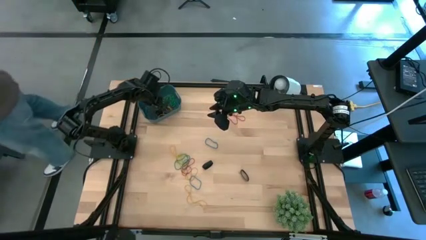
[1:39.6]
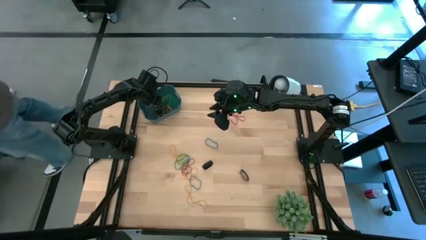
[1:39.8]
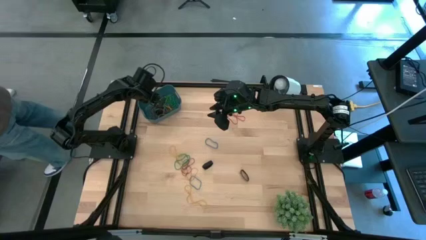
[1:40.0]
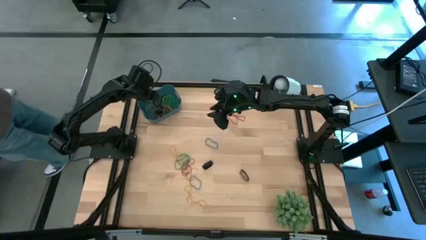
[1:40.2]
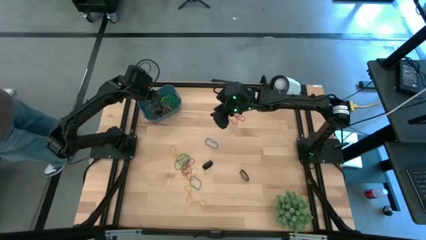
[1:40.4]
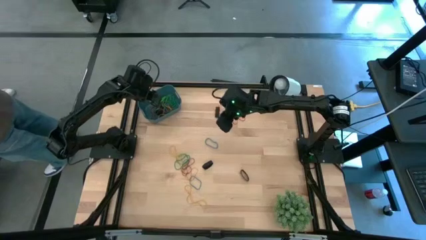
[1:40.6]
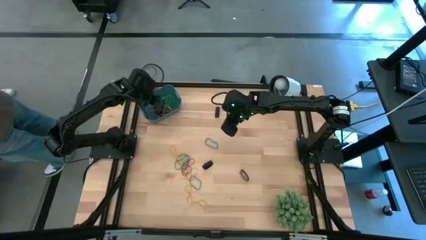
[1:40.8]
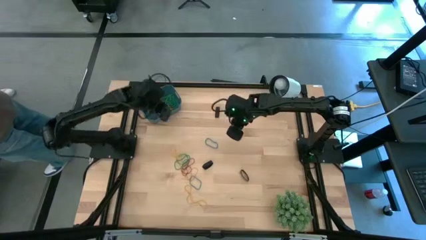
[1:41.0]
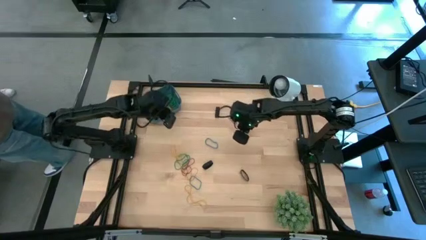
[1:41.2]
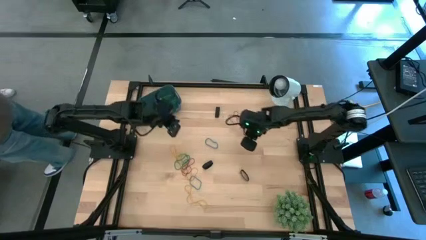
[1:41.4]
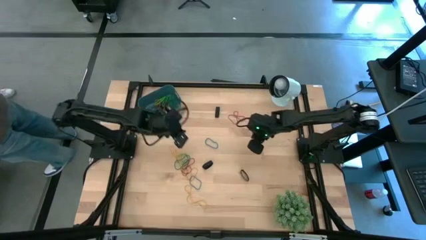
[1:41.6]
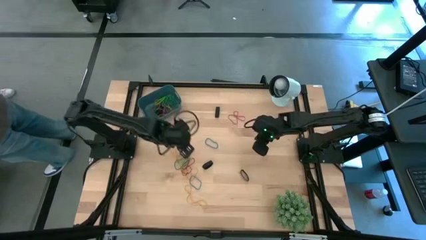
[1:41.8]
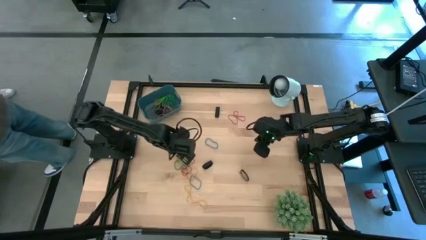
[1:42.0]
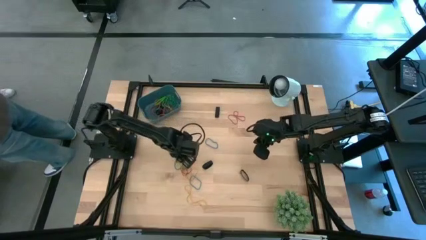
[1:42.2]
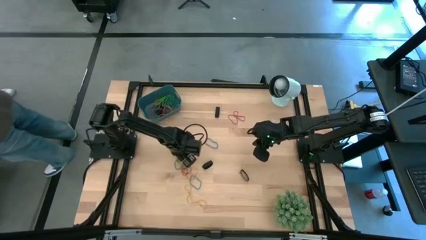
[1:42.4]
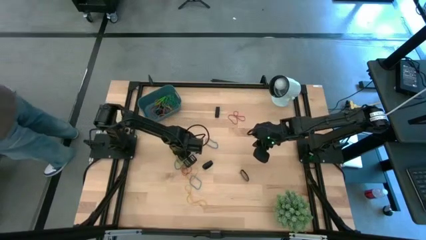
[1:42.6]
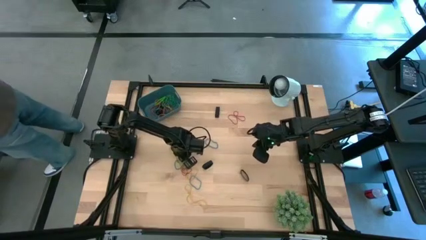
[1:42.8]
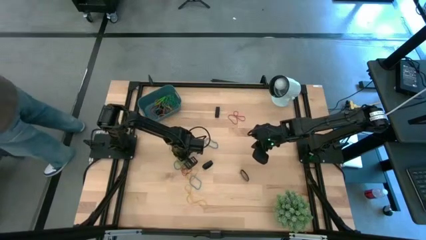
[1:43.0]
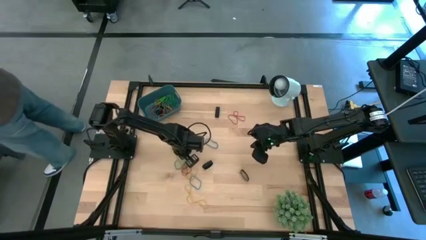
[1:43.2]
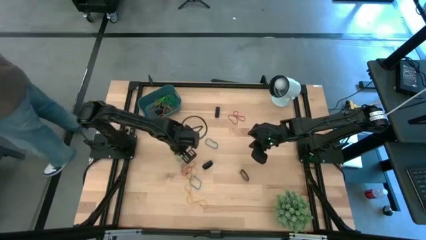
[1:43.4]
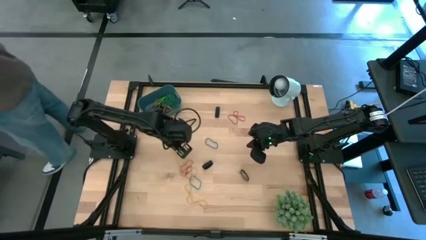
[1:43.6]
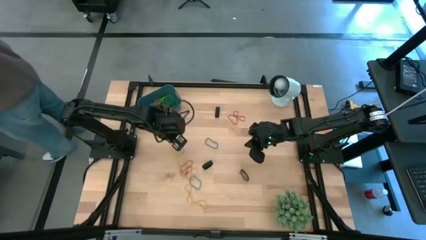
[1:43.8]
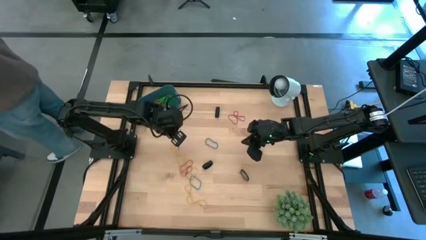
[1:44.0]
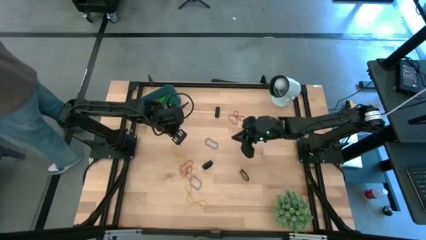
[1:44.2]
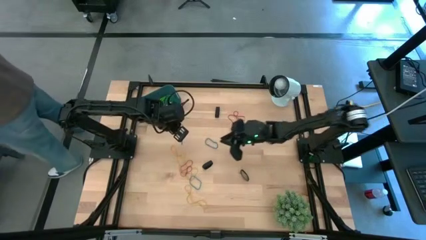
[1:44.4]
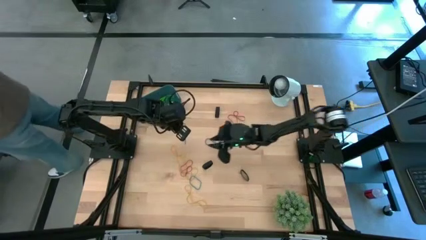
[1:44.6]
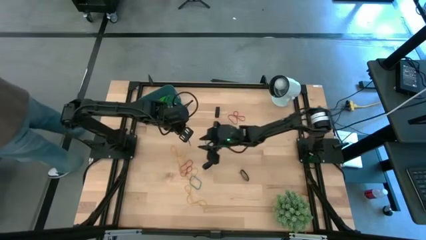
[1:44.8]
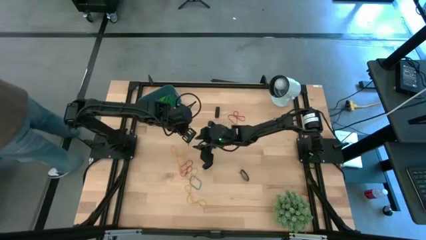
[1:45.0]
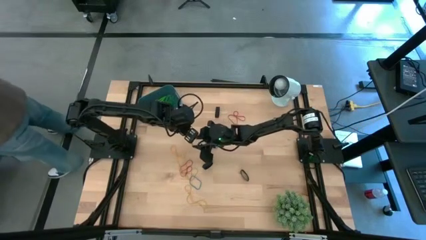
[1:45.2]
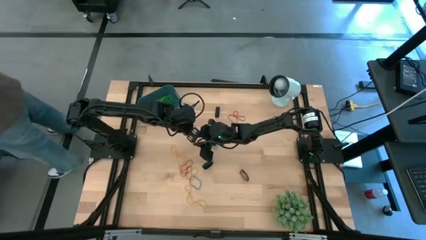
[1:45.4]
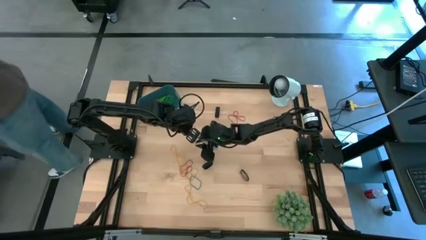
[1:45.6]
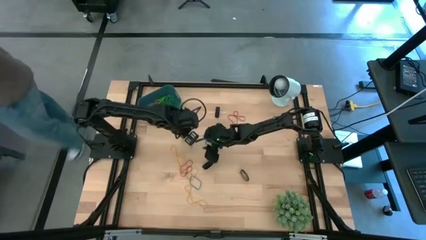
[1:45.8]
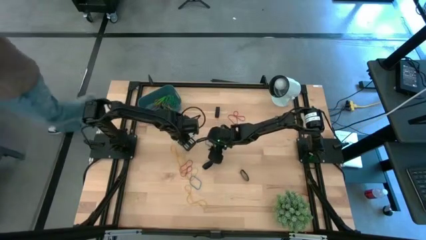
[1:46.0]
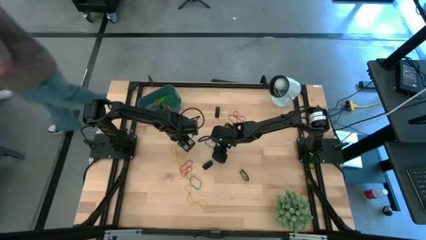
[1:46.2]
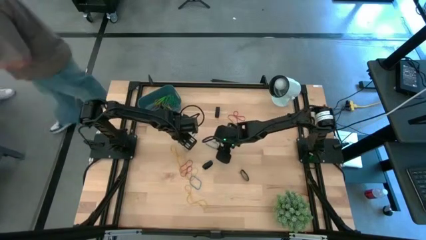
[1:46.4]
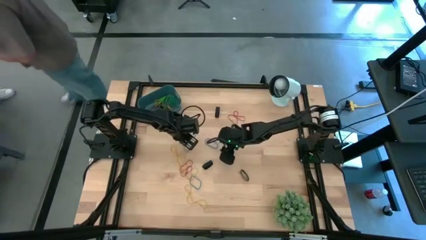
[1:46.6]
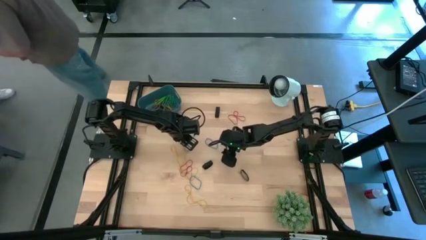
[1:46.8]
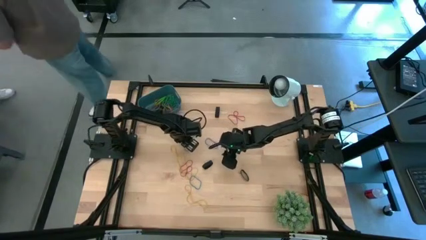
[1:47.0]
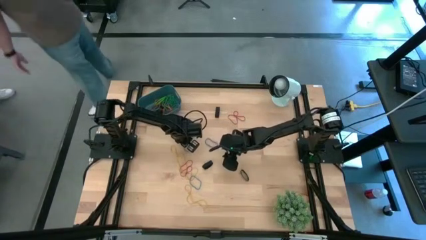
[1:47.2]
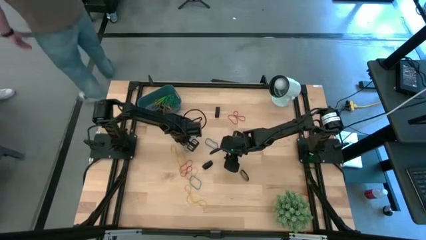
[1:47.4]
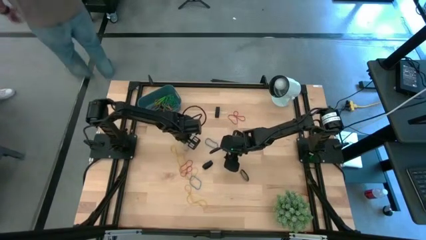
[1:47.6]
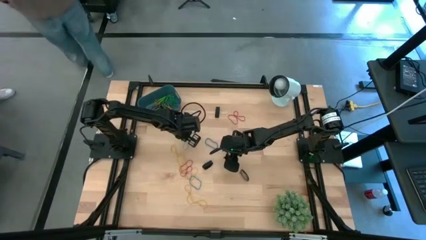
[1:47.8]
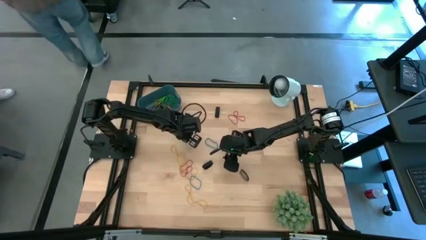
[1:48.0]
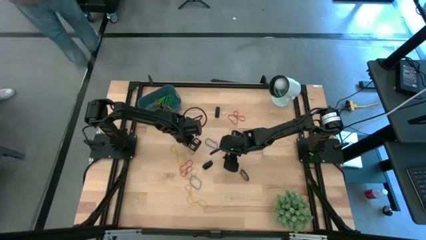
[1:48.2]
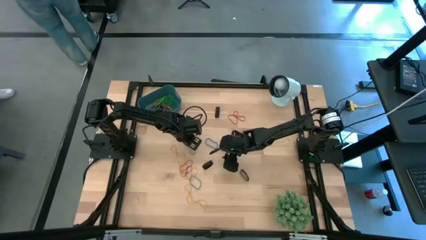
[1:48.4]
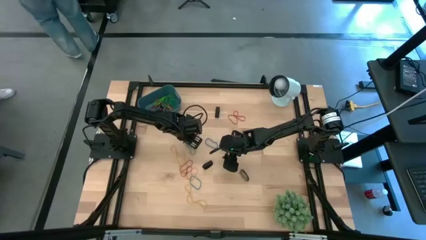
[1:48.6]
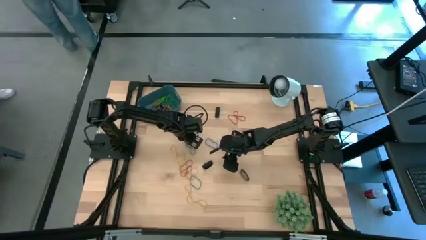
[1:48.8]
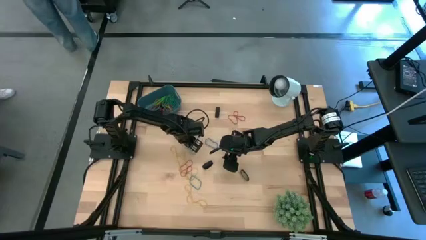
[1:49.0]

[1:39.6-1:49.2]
Task: Pick and place rubber bands into bin
Put the green rubber band into the bin

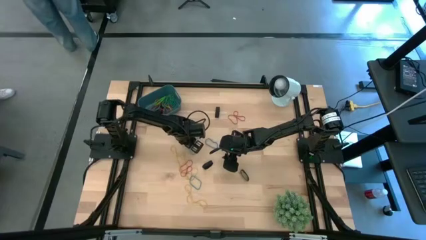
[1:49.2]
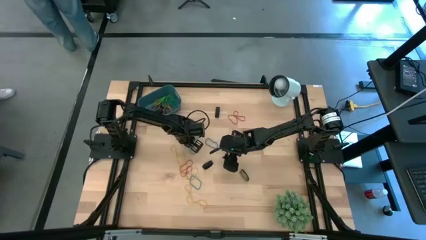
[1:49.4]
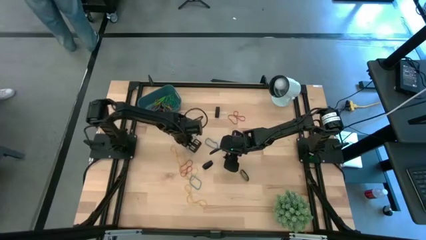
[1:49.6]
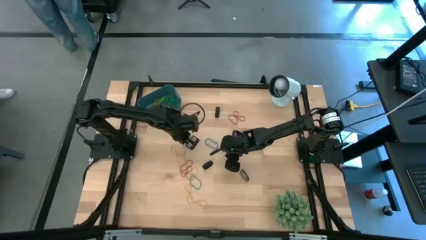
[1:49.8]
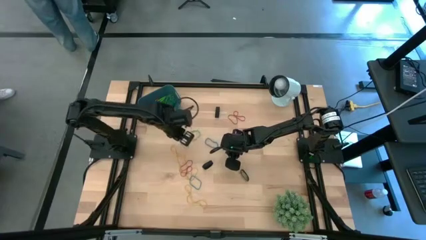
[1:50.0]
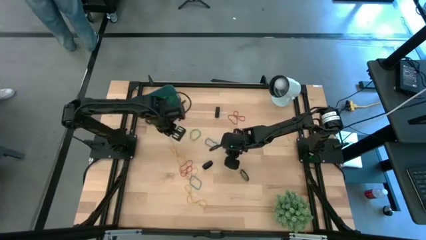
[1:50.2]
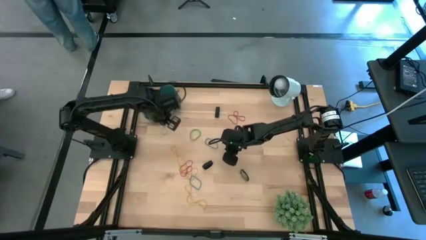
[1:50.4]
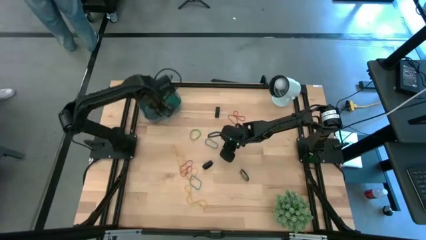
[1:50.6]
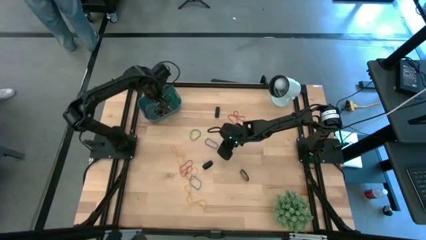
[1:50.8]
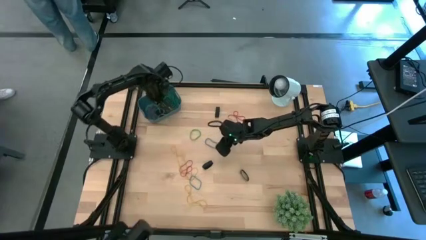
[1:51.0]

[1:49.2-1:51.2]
Put the blue rubber band into the bin

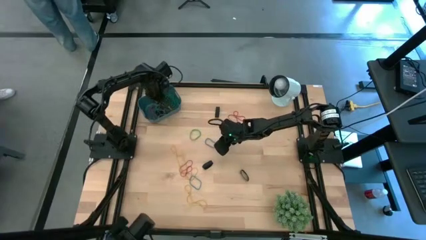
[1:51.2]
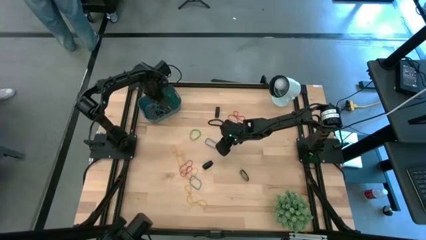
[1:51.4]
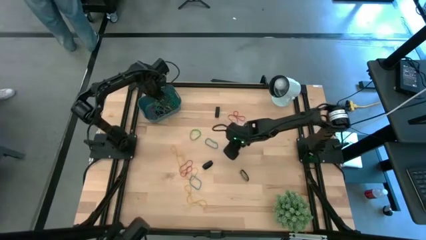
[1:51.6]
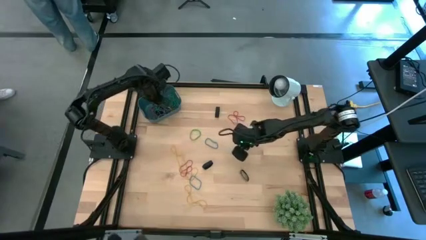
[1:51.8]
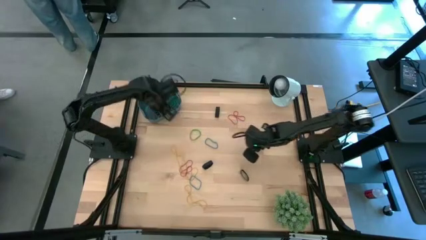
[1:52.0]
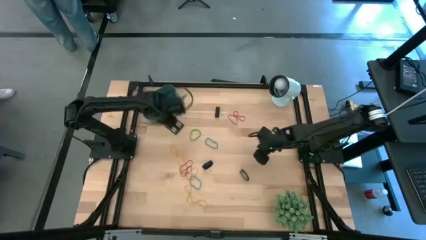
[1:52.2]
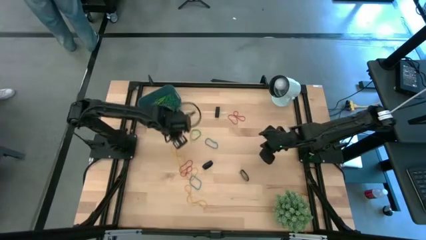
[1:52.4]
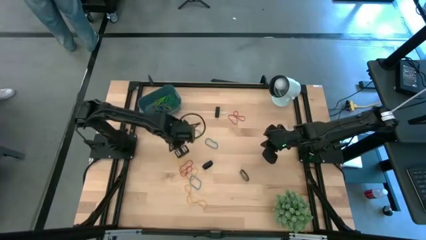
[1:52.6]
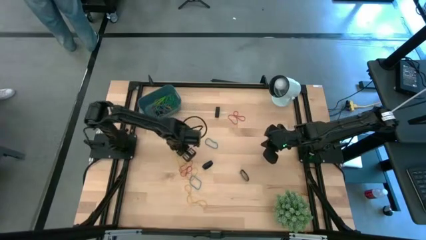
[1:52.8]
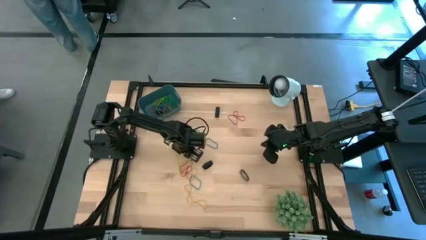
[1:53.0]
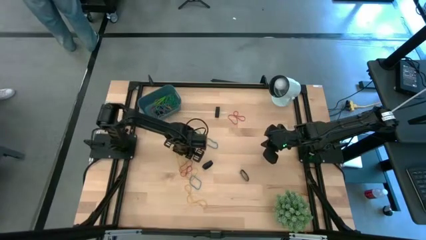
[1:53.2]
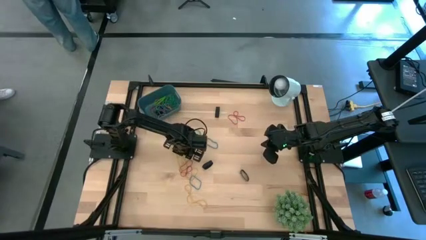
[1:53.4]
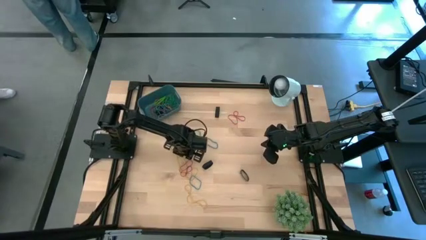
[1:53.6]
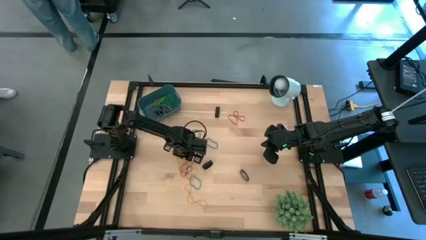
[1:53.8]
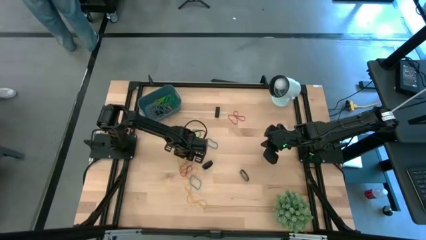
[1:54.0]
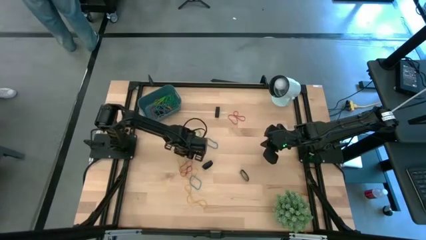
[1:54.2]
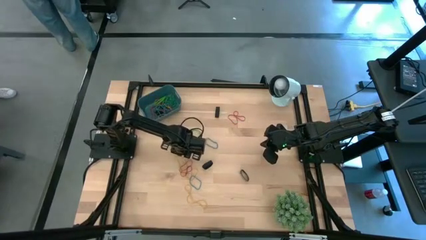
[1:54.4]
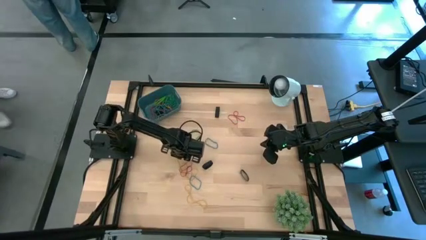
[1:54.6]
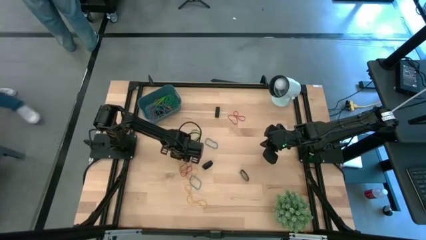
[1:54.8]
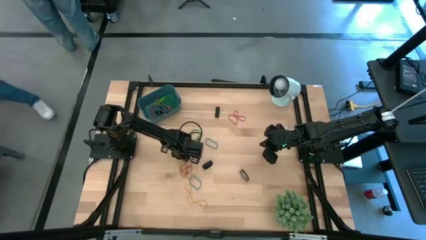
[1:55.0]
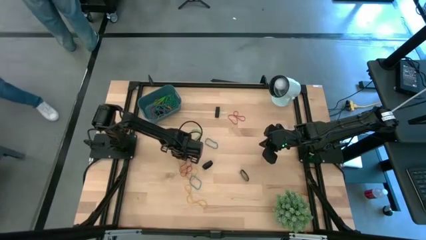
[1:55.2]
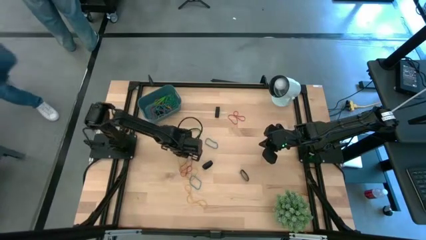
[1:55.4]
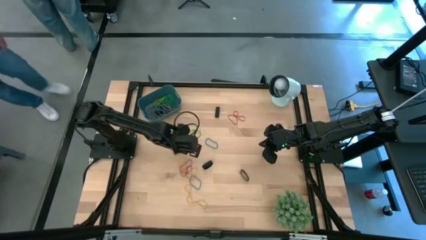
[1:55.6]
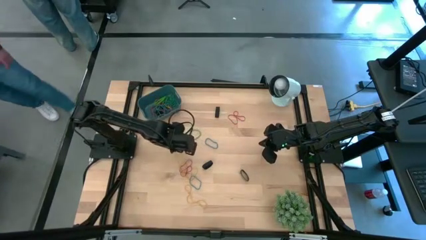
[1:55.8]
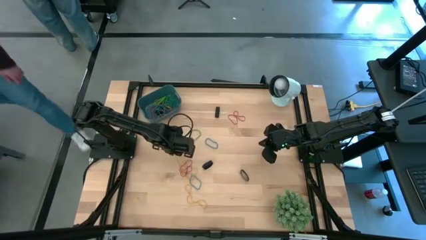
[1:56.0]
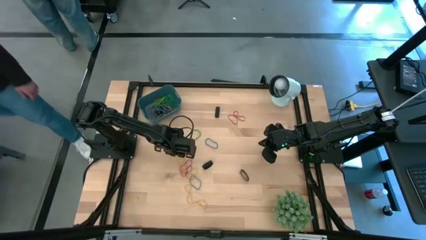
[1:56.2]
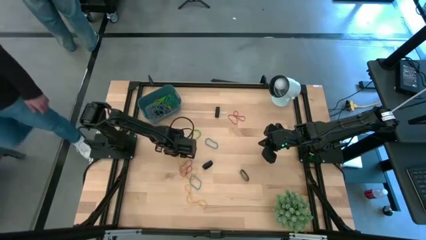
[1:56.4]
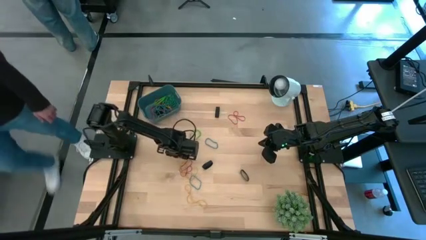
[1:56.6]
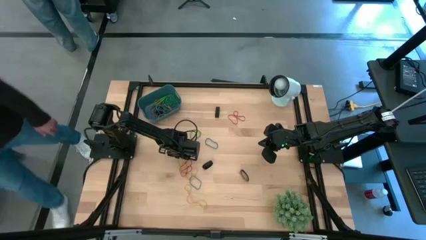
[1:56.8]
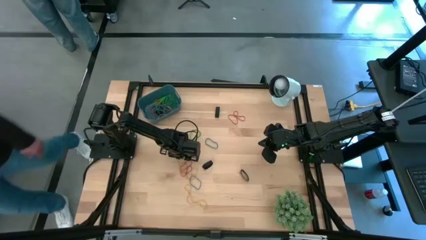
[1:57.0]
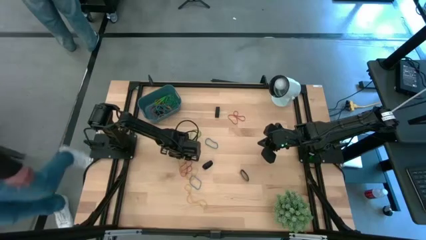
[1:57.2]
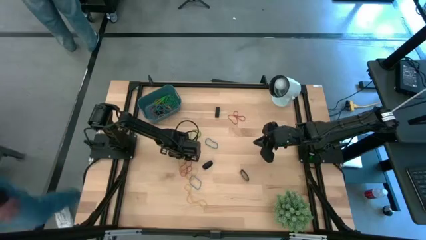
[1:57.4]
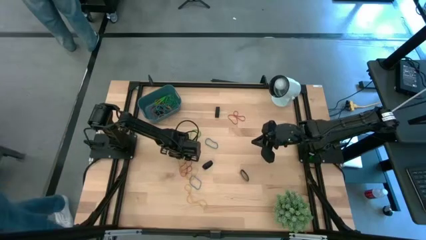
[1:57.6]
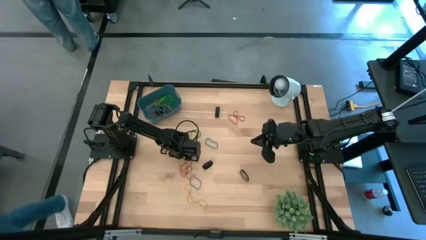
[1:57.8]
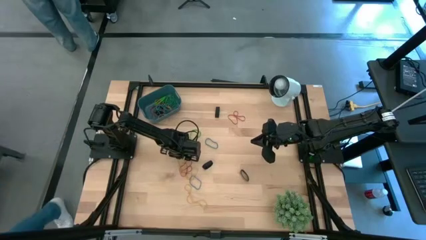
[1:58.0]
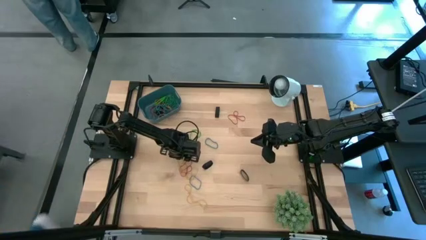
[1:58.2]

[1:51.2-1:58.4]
Put the top yellow rubber band into the bin
